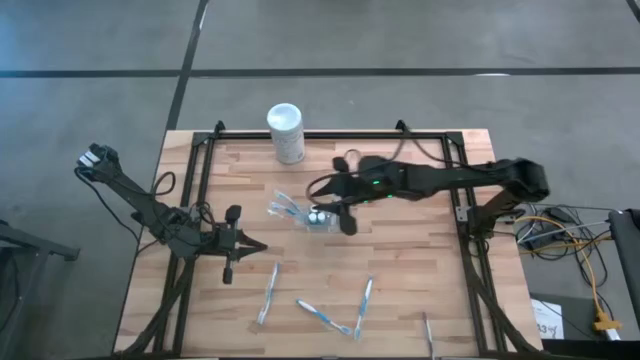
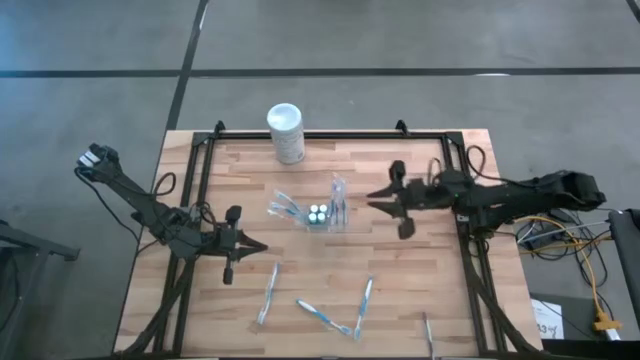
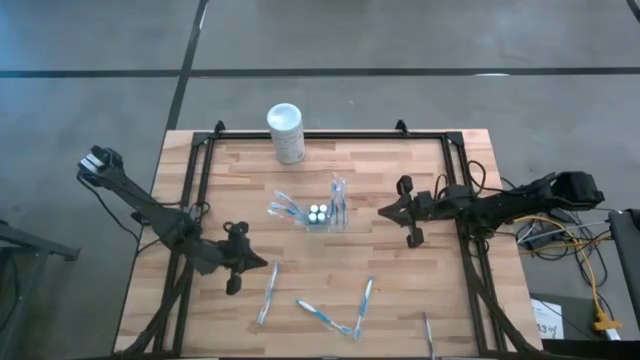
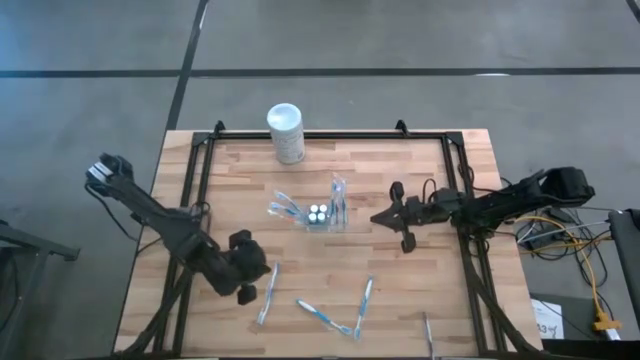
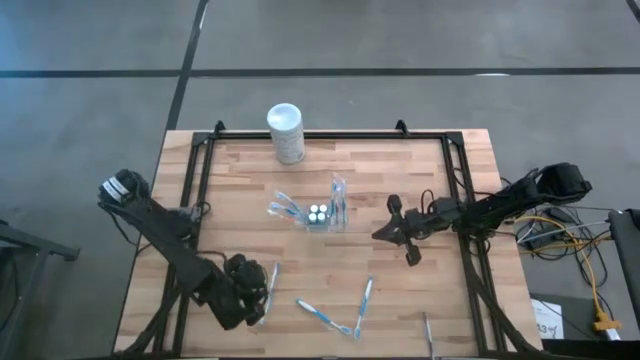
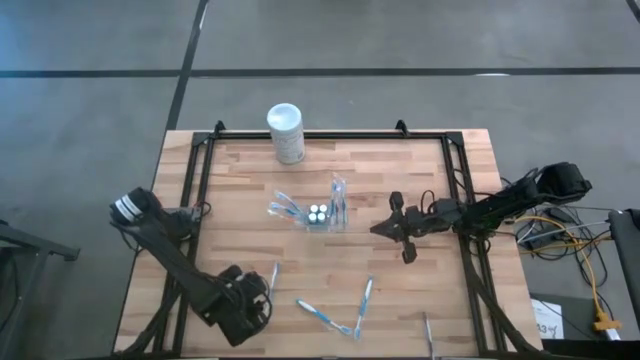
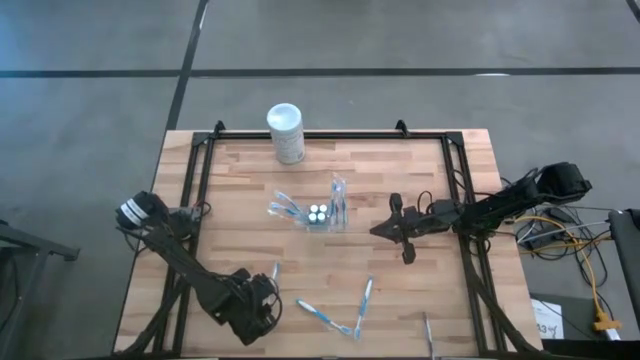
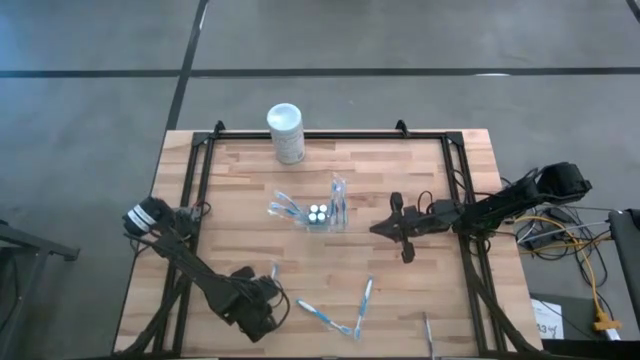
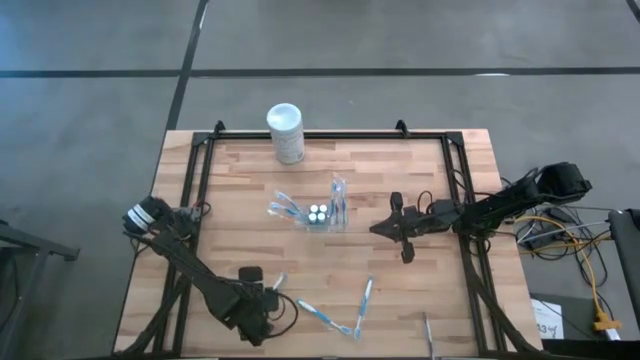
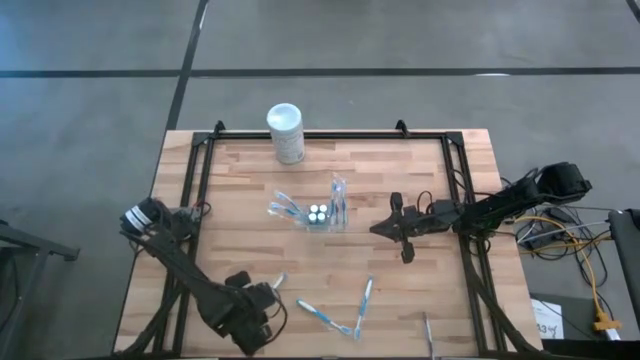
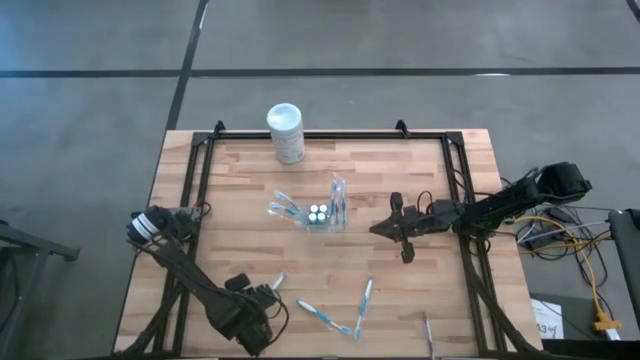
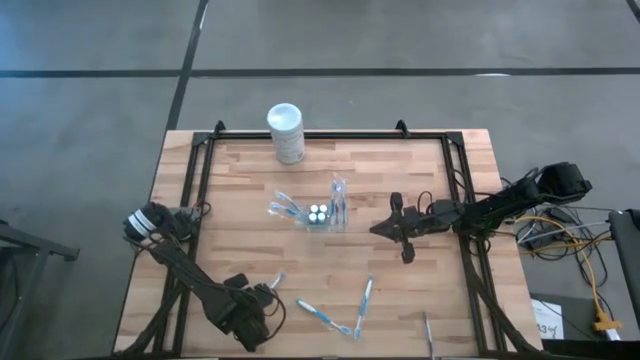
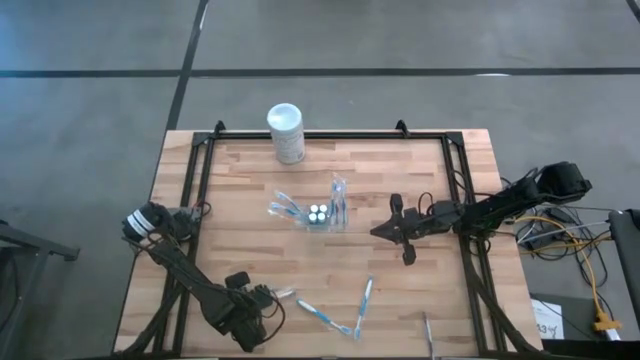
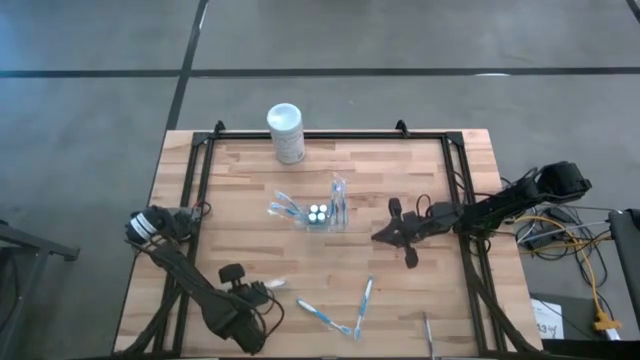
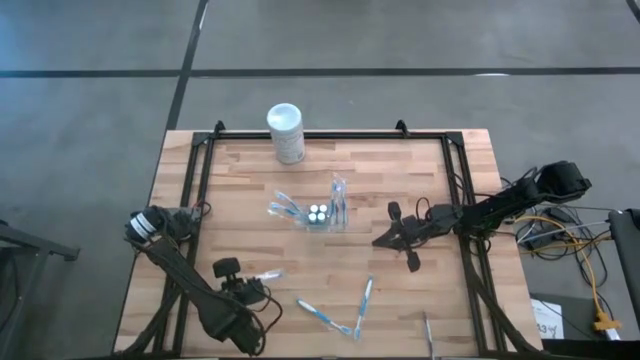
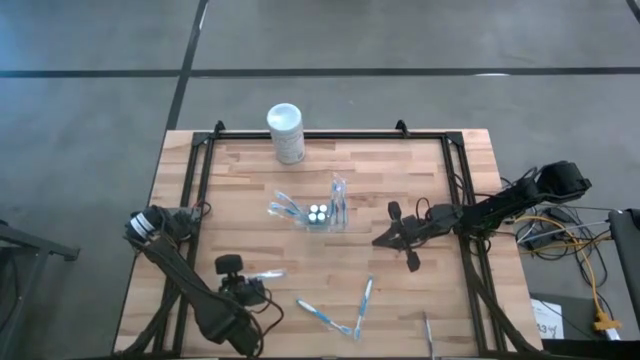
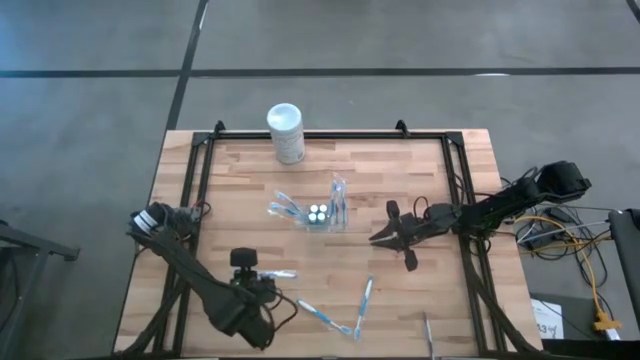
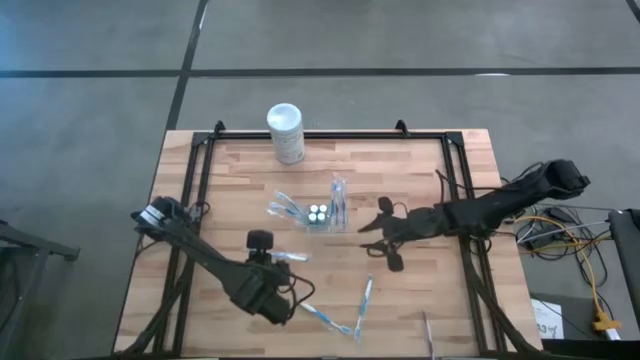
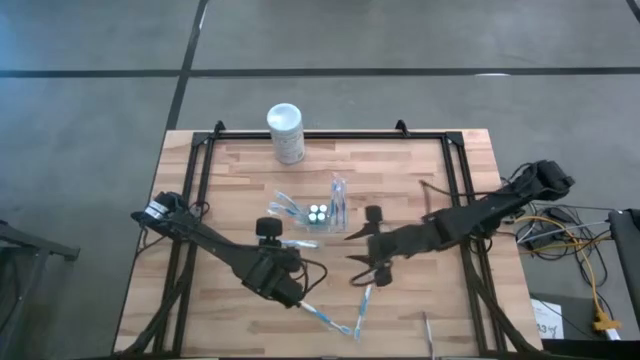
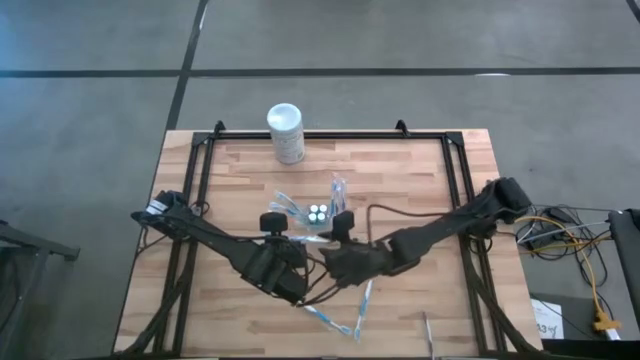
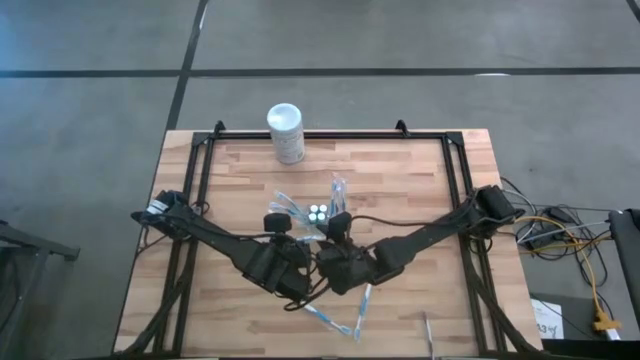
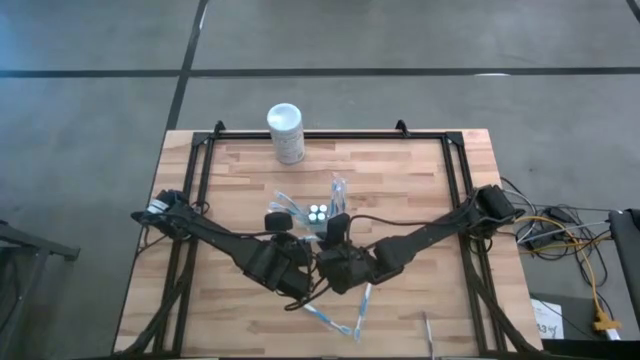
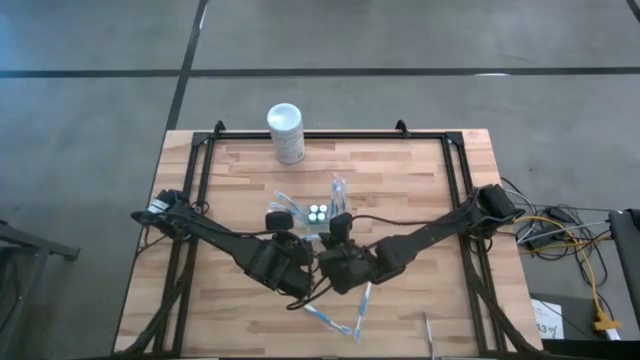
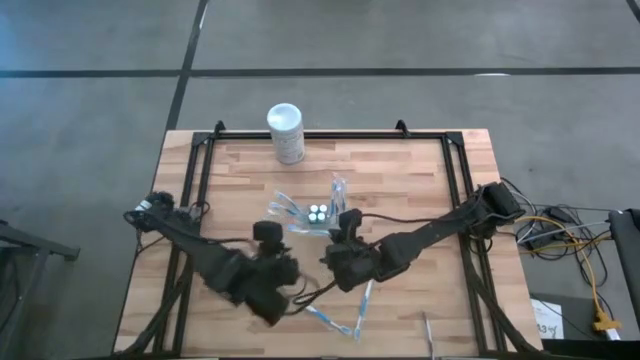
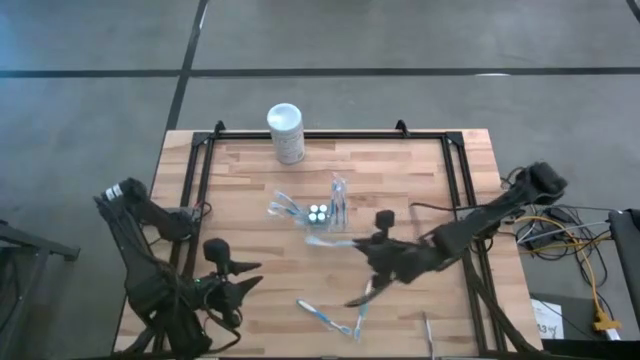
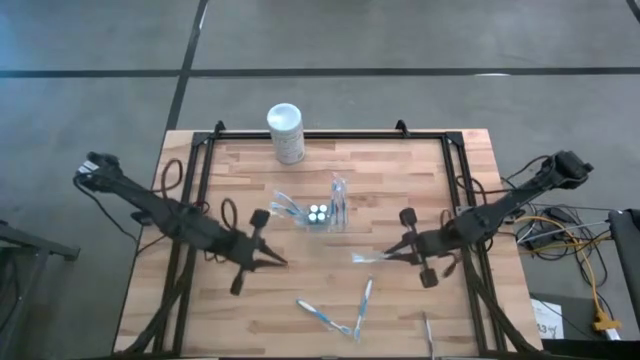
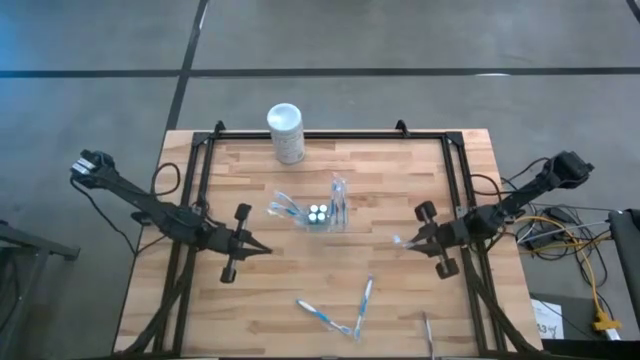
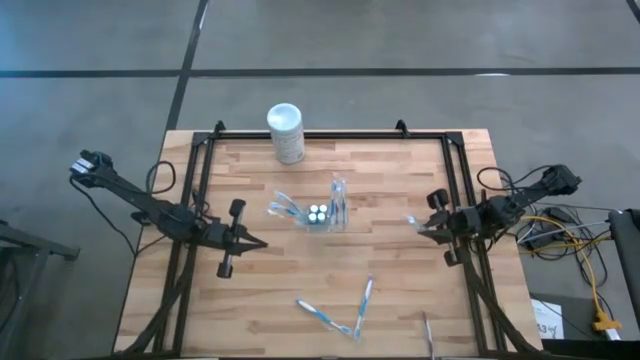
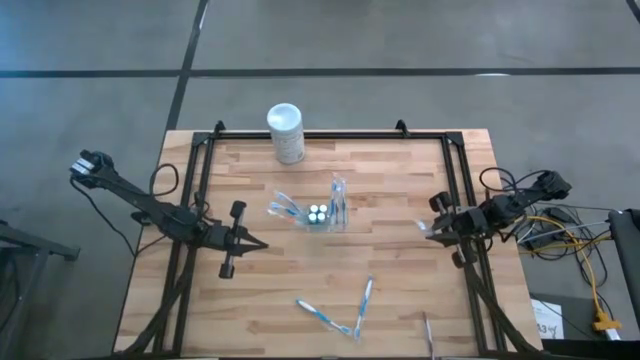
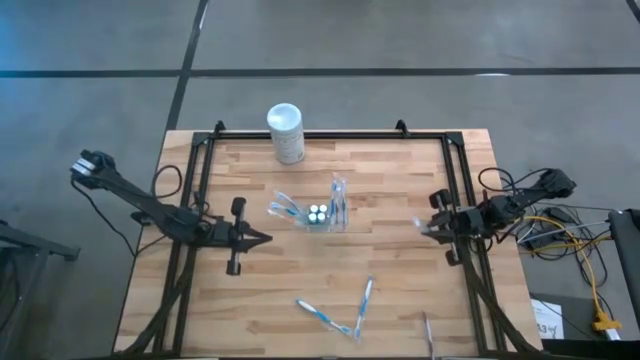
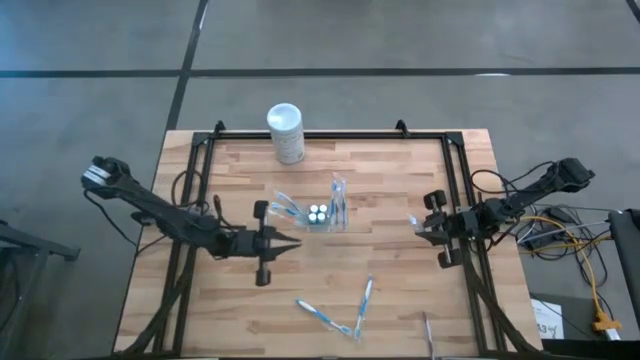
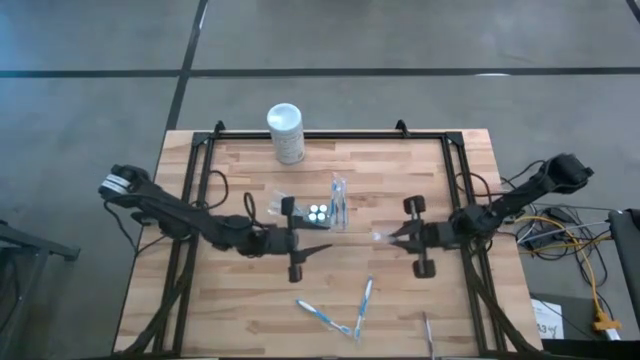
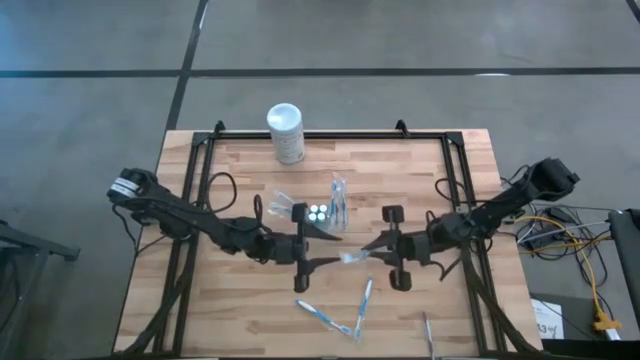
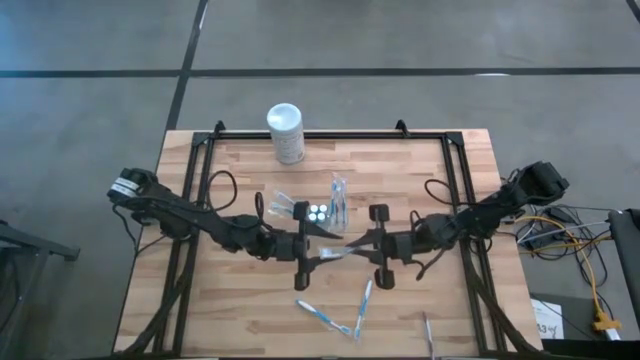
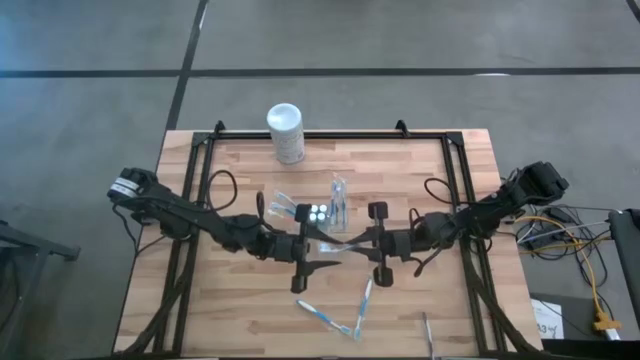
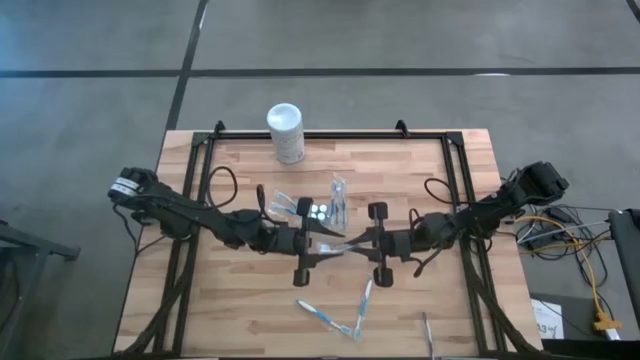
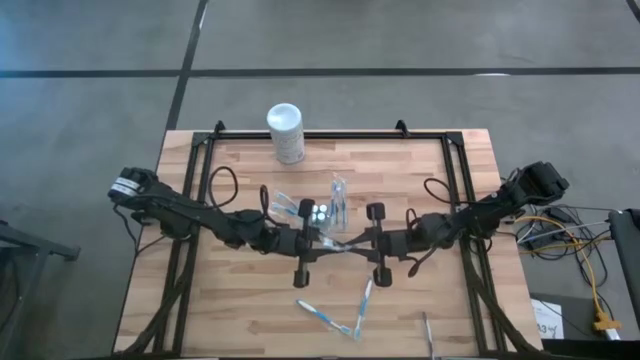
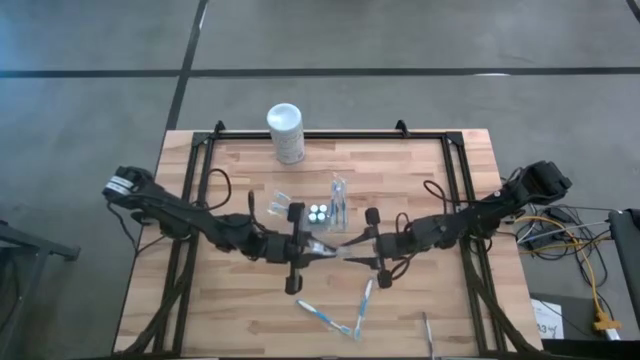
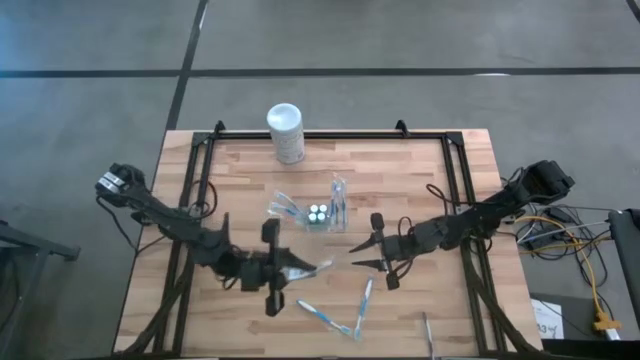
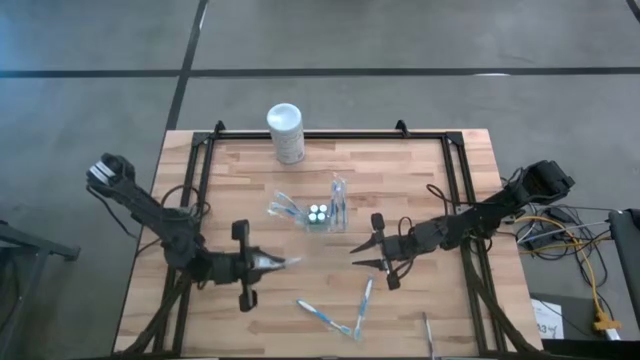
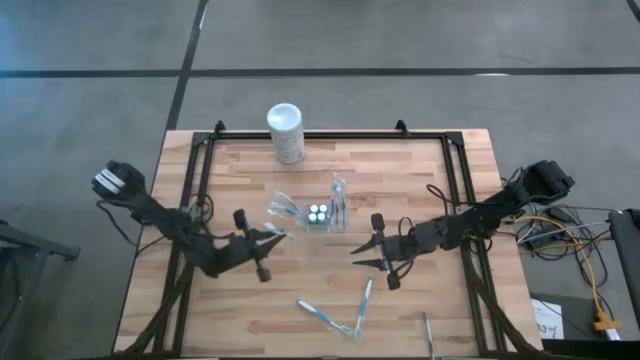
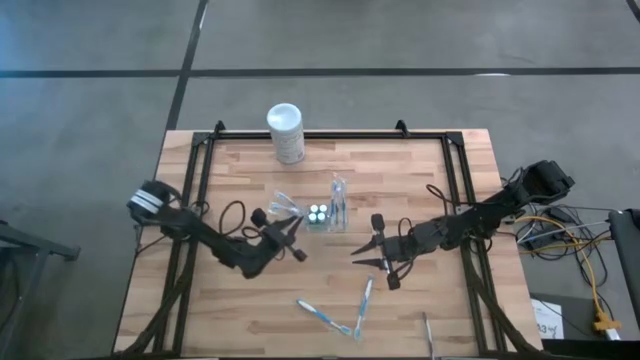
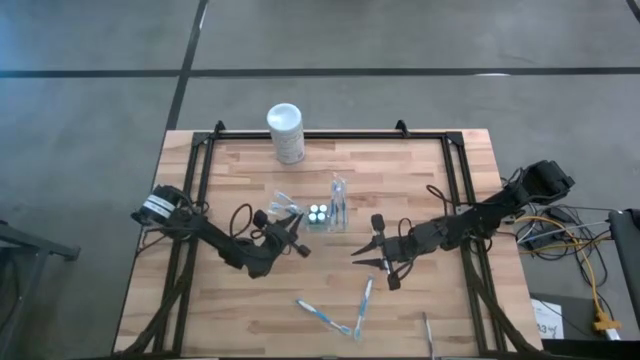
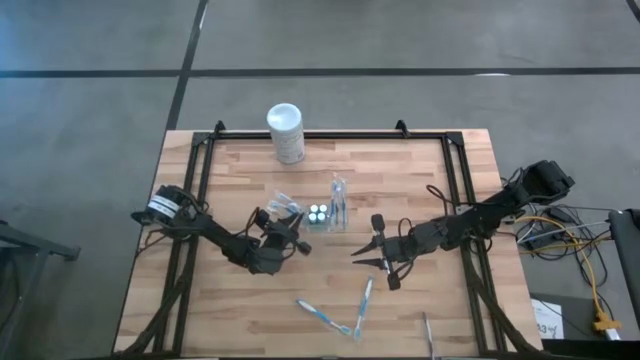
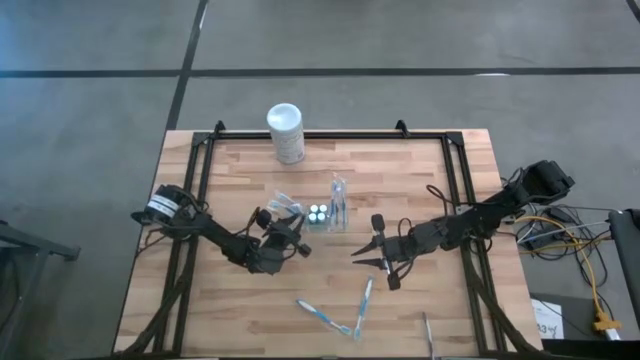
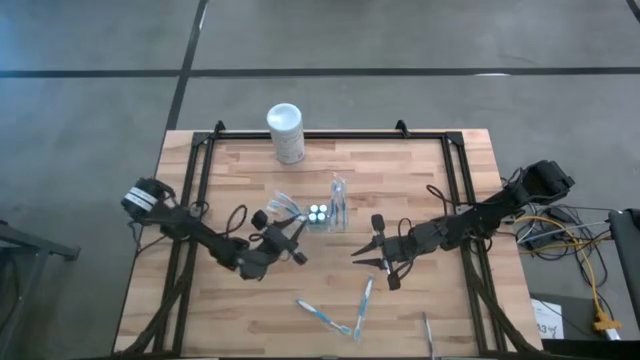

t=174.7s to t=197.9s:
Task: Pick & Place toothbrushing station
Put the blue toothbrush into the transparent organizer
